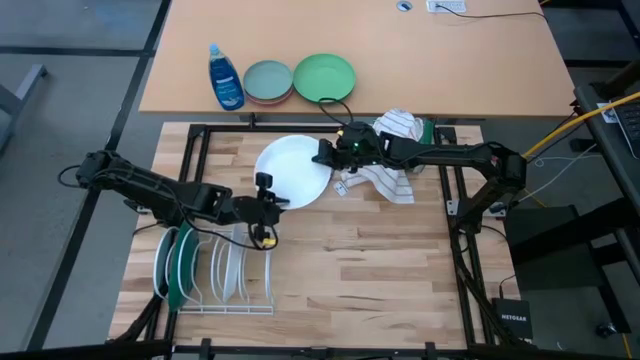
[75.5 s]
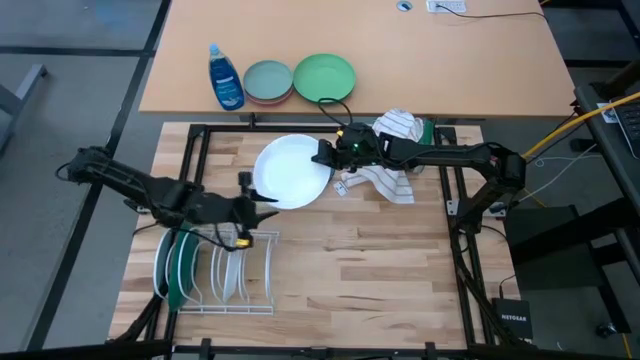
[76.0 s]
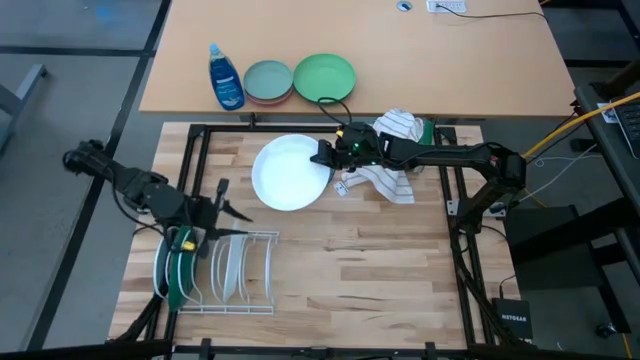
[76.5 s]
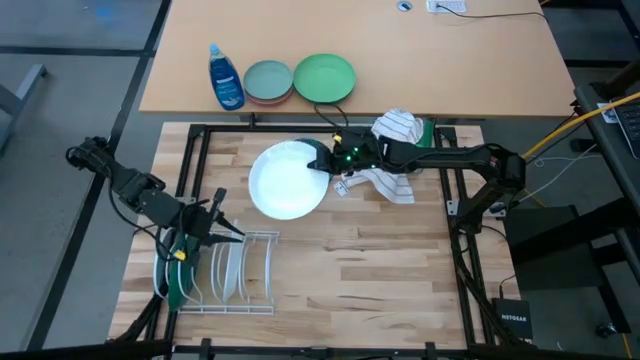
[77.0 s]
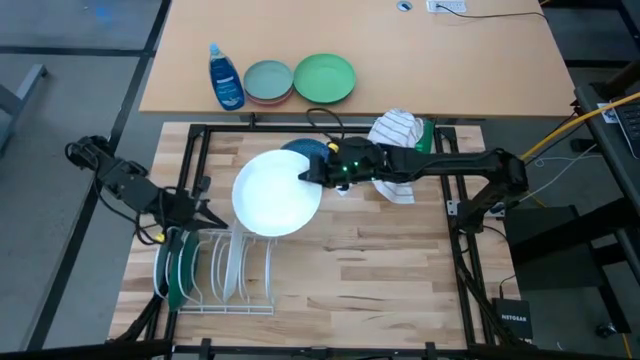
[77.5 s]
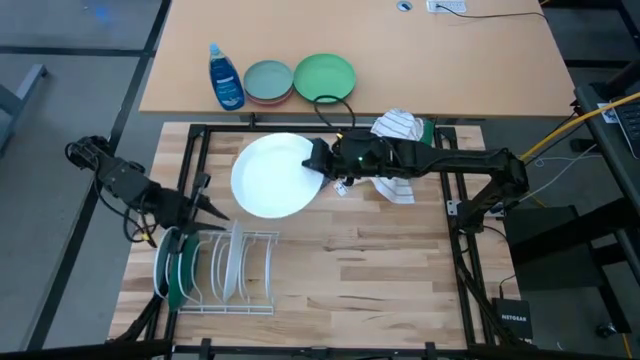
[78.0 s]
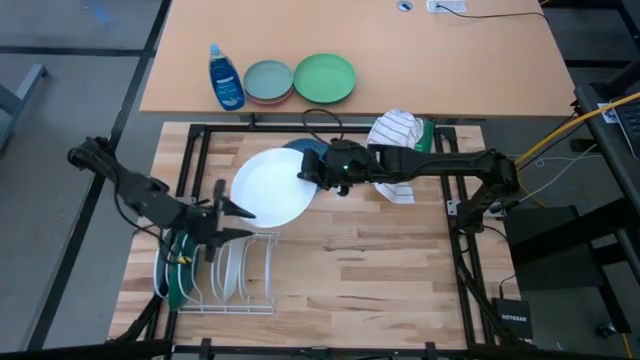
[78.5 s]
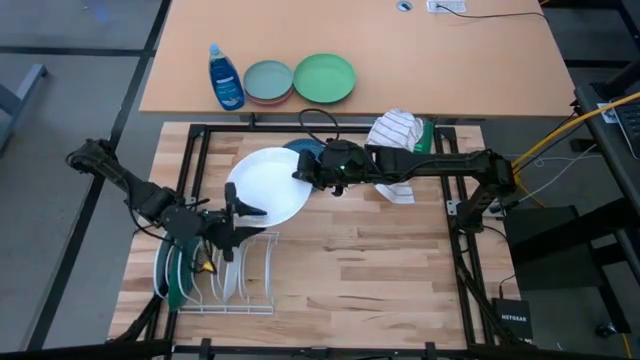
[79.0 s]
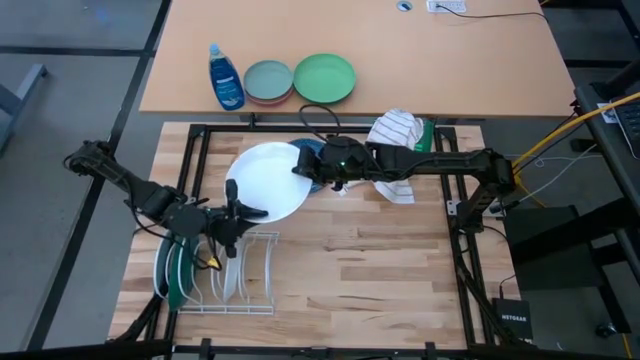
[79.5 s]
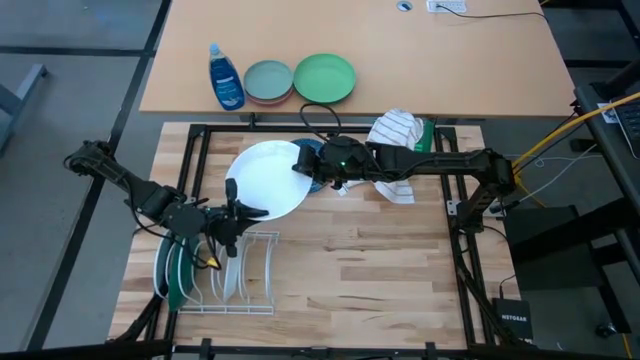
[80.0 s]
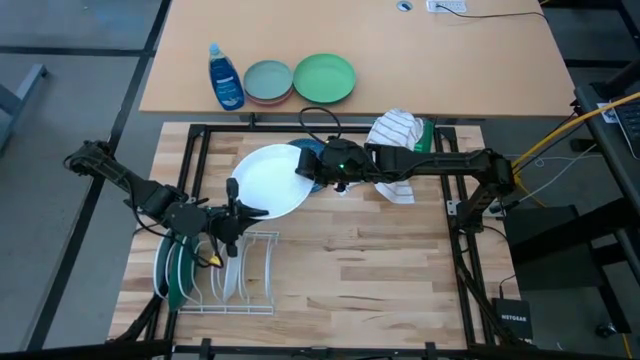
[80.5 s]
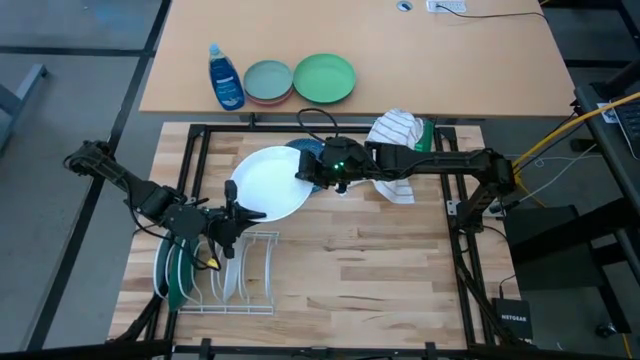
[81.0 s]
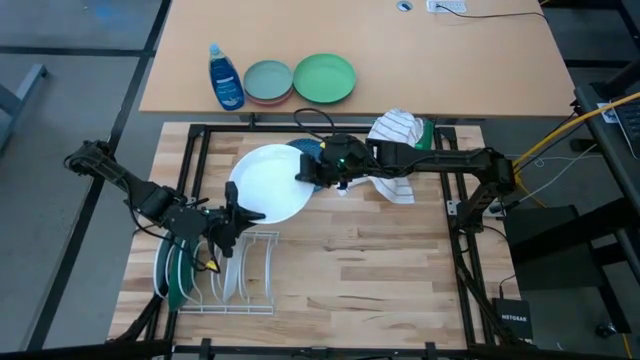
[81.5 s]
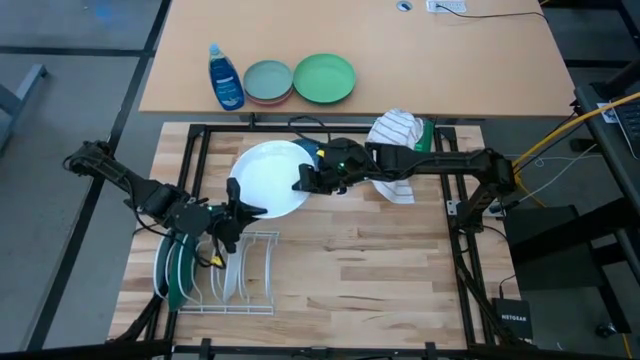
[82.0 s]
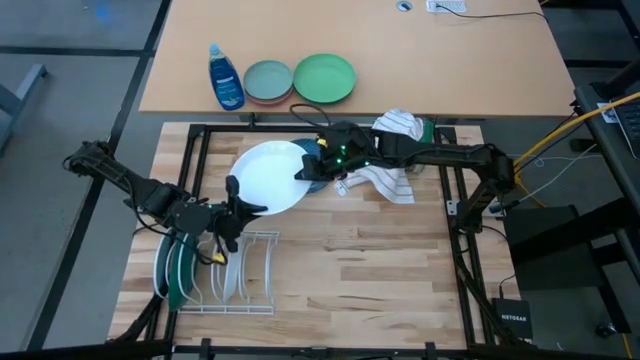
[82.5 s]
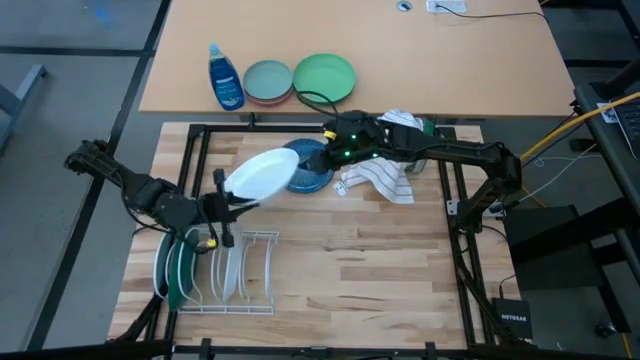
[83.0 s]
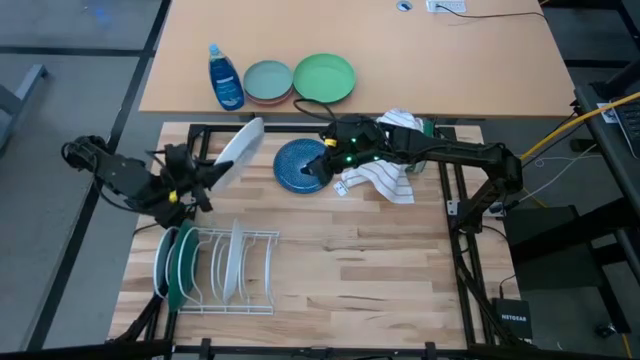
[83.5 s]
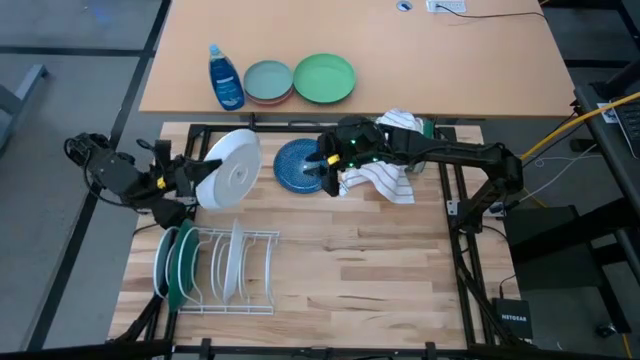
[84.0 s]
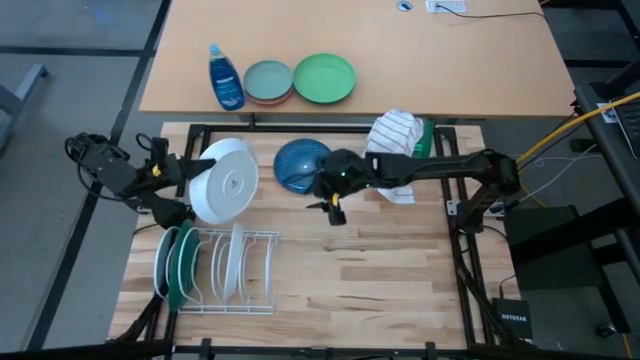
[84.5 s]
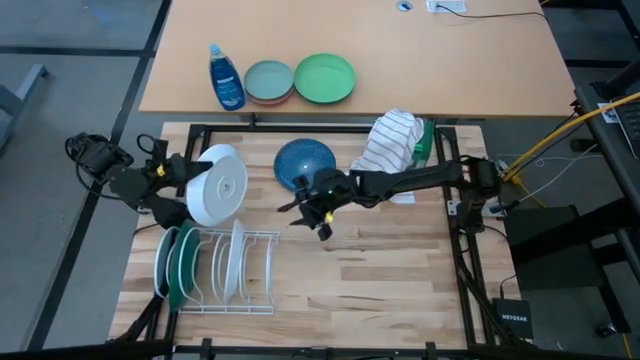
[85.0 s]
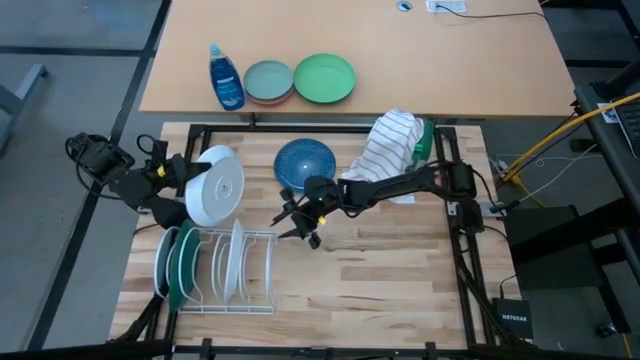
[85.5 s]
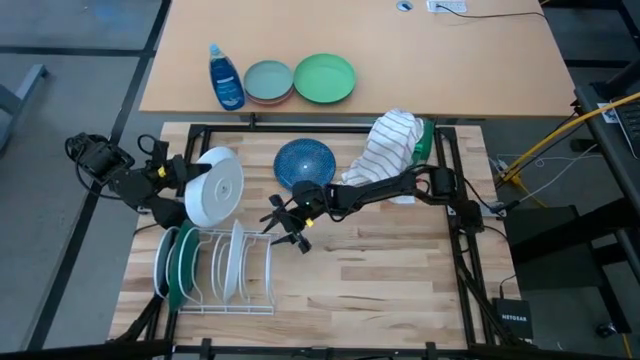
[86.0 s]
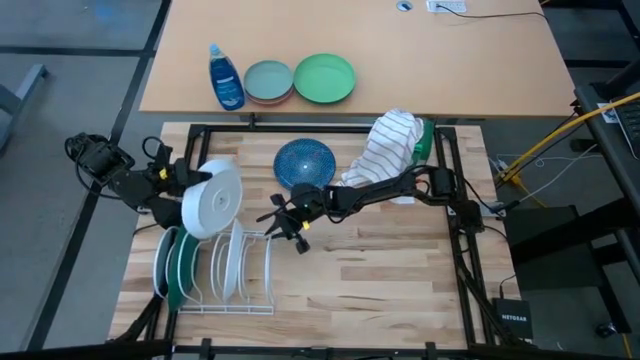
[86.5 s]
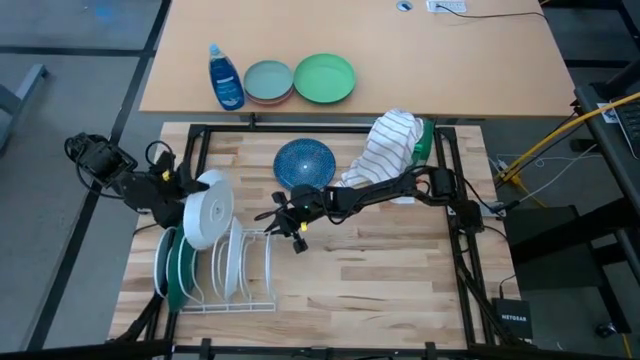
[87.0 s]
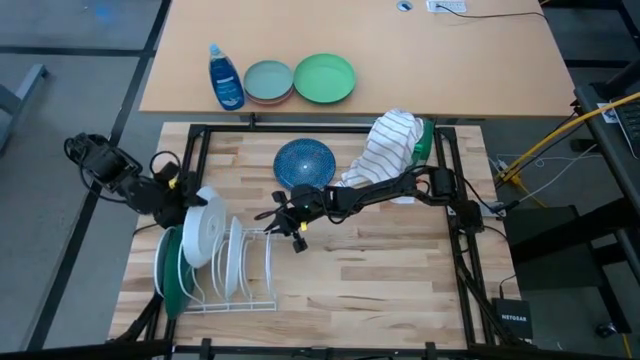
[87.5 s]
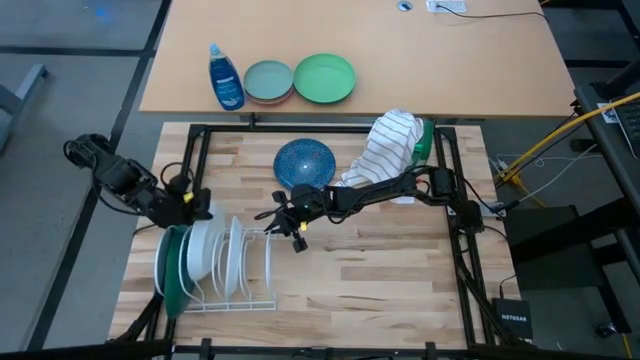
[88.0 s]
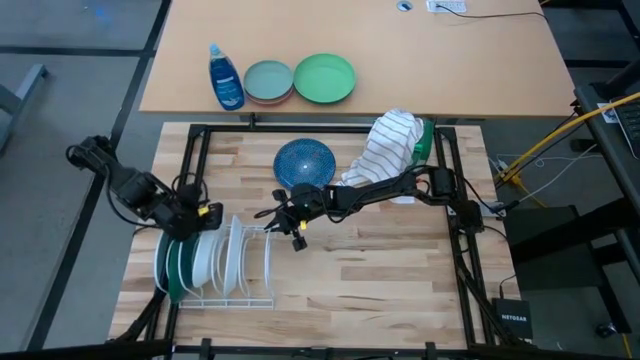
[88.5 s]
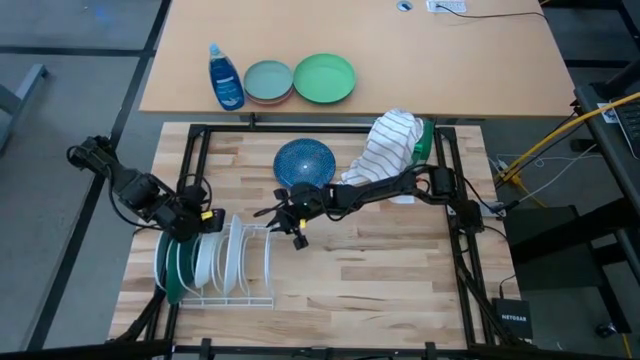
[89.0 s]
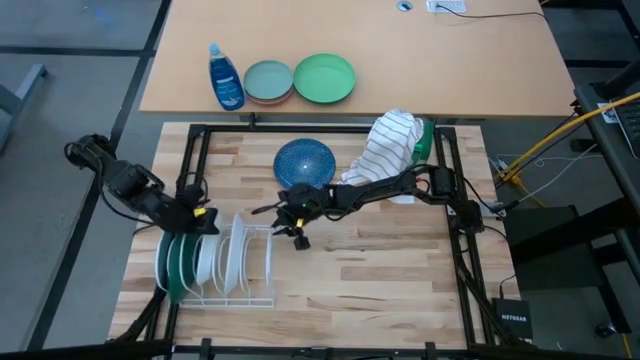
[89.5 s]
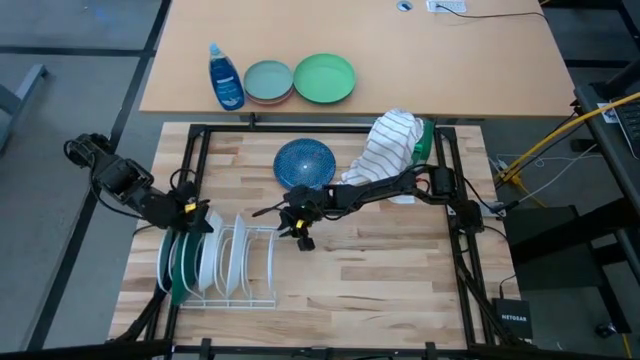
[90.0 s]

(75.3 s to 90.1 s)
Task: Sort dishes
Put the white plate in the white dish rack

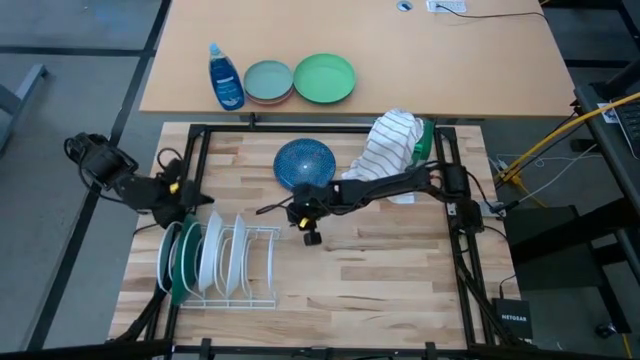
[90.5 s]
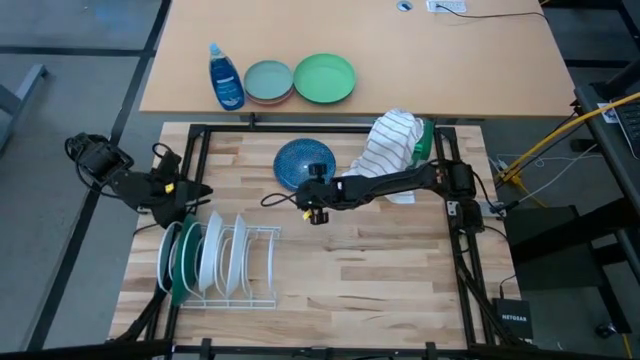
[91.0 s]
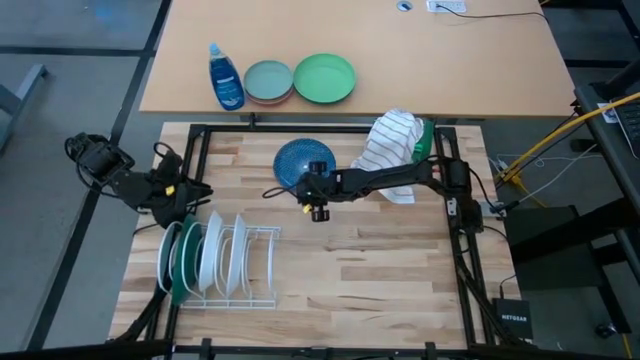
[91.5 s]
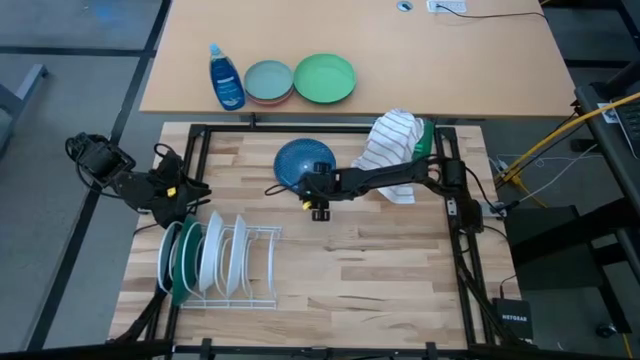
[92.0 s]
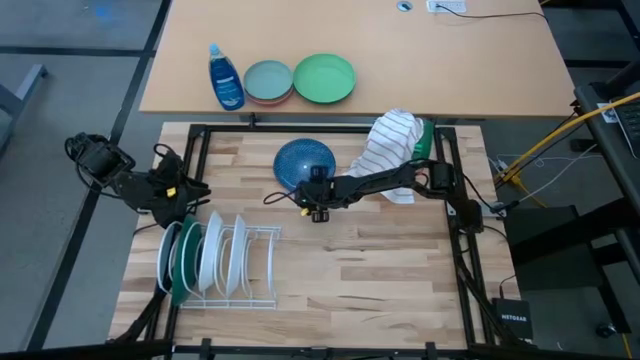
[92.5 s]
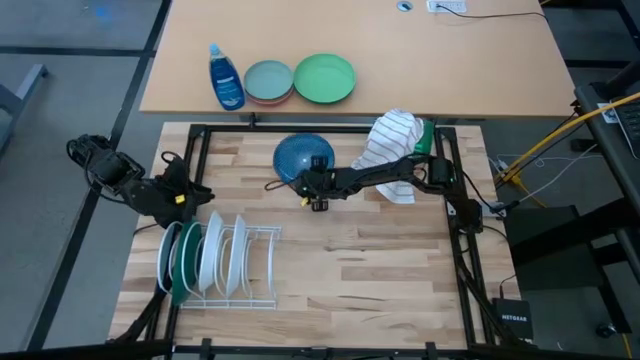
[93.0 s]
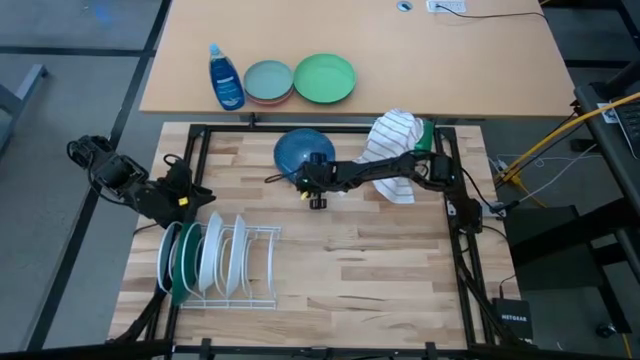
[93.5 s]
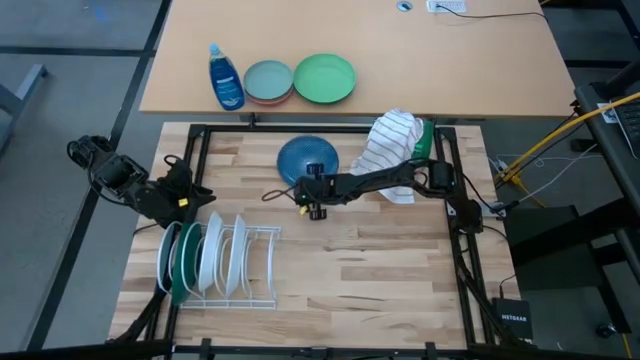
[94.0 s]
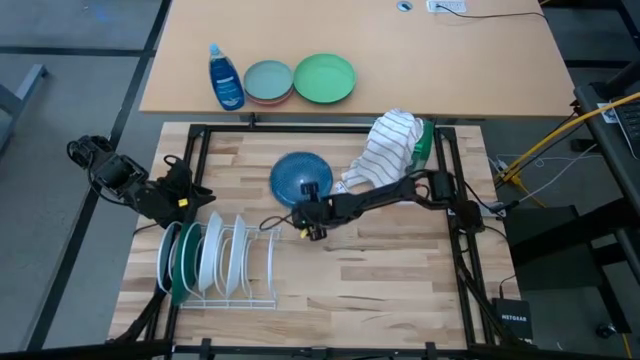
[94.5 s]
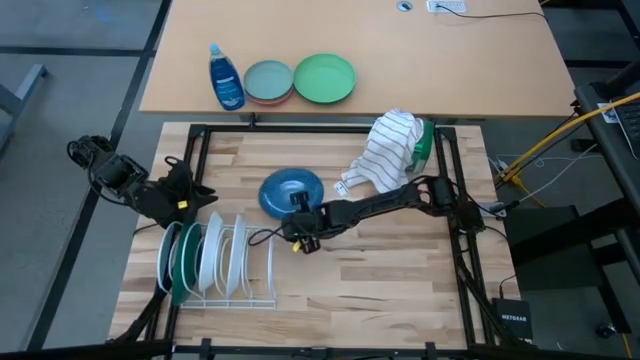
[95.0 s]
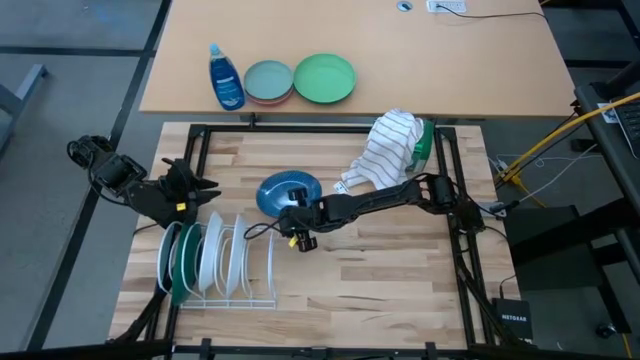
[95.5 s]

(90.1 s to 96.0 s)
Put the blue plate in the white dish rack

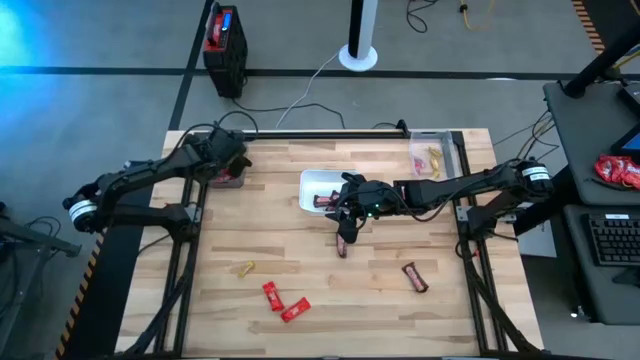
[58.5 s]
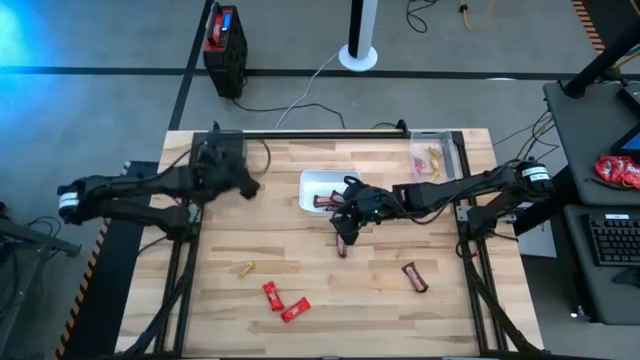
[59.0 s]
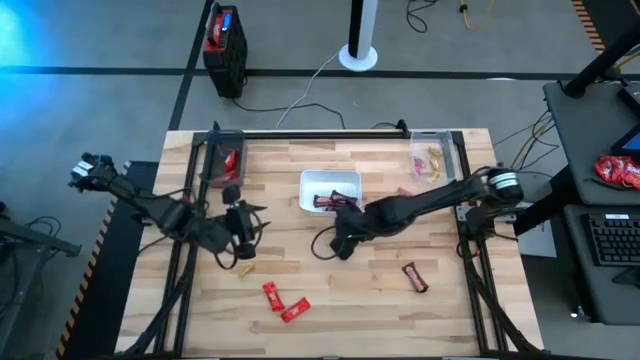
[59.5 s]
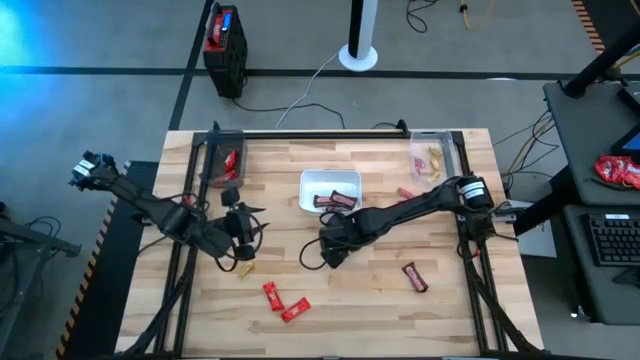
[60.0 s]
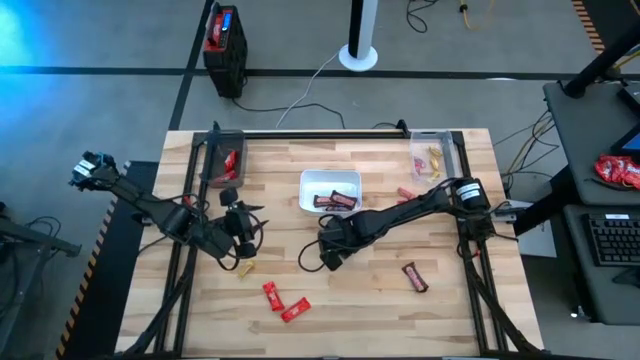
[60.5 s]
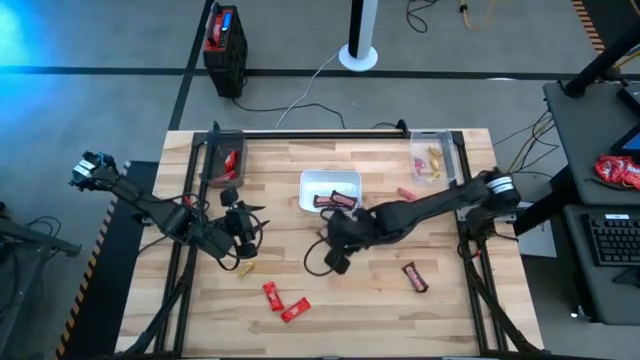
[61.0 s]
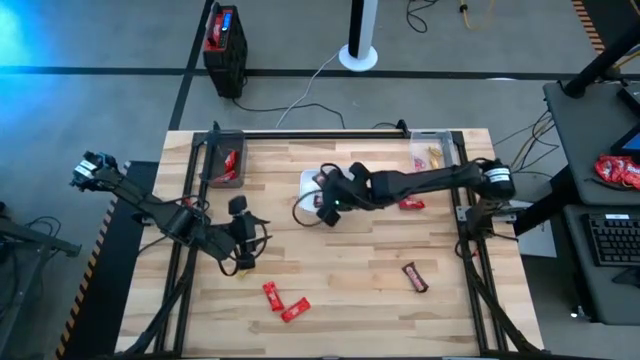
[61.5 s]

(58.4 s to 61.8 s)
Task: Sort candy by brand, put in halloween buckets
Put the brown chocolate bar into the white bin
